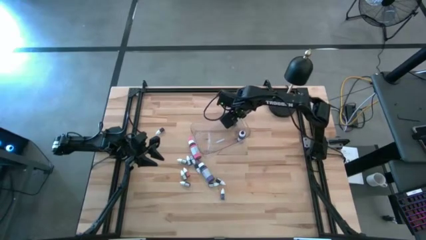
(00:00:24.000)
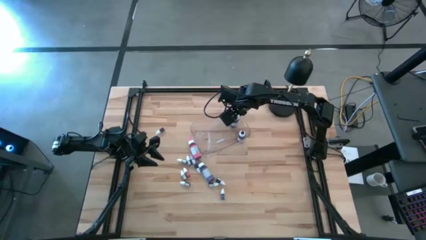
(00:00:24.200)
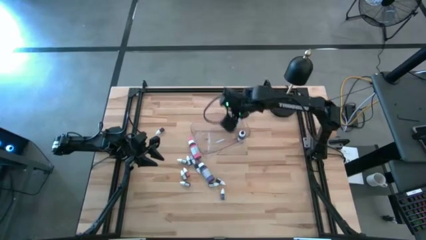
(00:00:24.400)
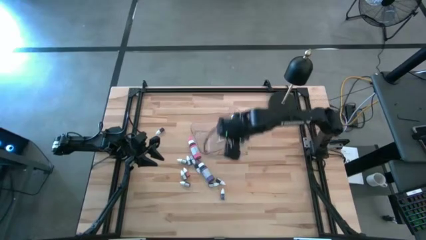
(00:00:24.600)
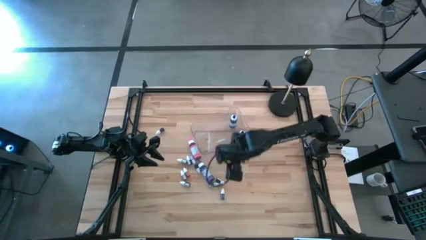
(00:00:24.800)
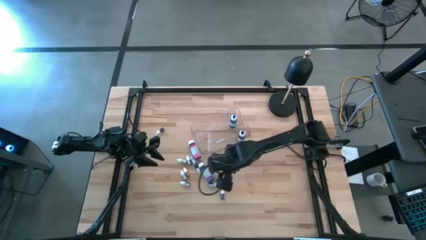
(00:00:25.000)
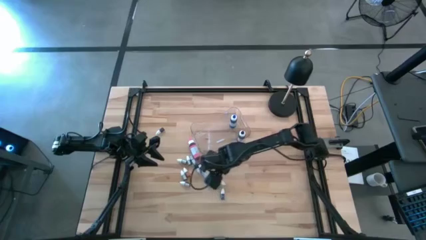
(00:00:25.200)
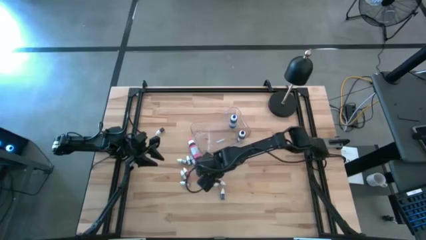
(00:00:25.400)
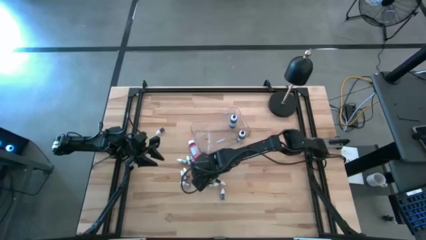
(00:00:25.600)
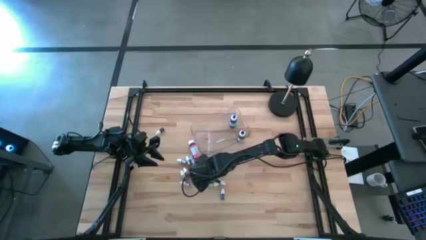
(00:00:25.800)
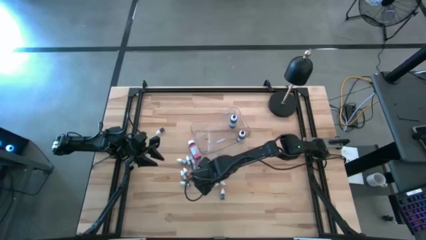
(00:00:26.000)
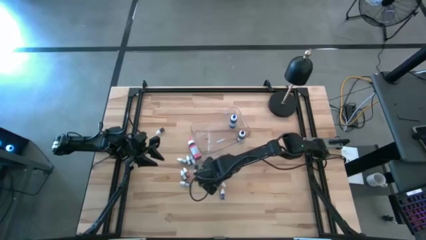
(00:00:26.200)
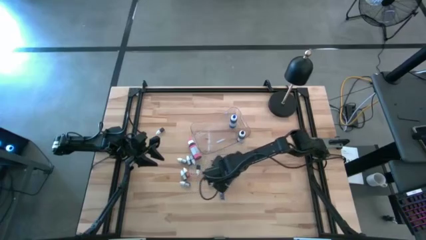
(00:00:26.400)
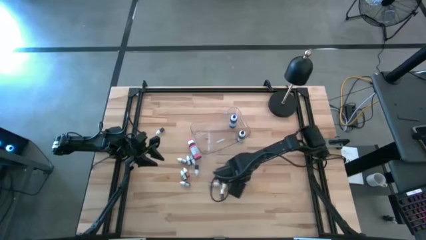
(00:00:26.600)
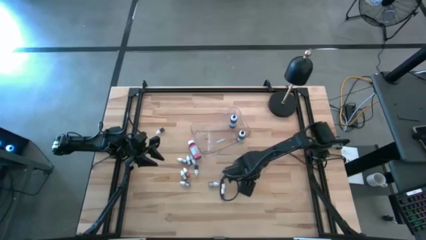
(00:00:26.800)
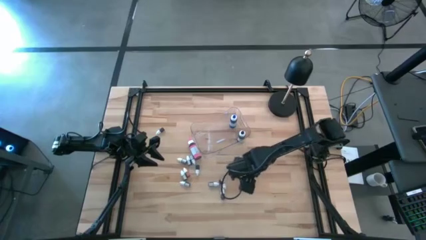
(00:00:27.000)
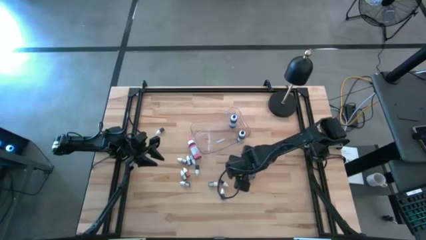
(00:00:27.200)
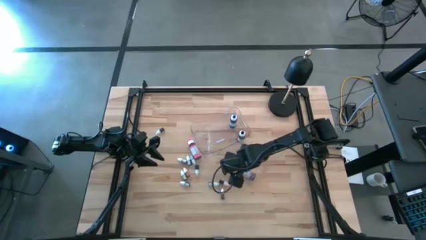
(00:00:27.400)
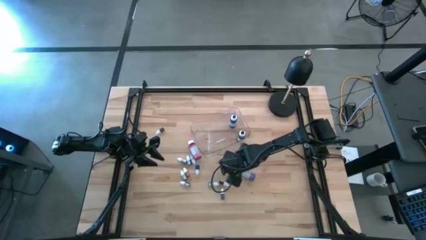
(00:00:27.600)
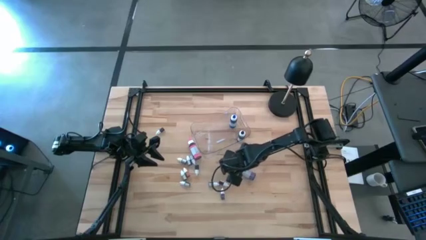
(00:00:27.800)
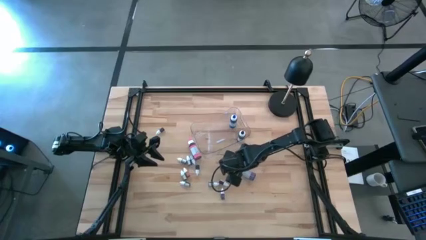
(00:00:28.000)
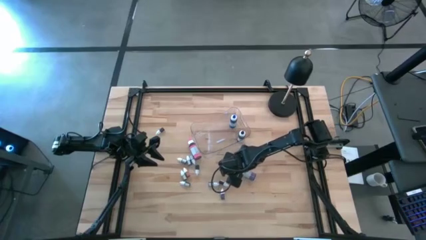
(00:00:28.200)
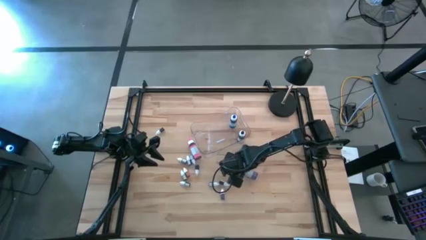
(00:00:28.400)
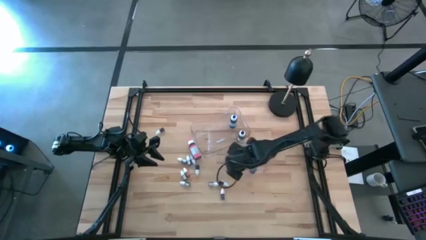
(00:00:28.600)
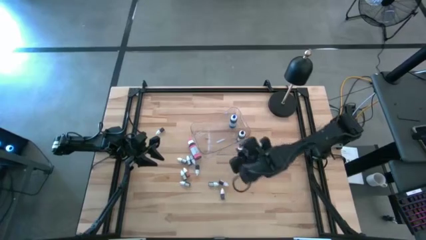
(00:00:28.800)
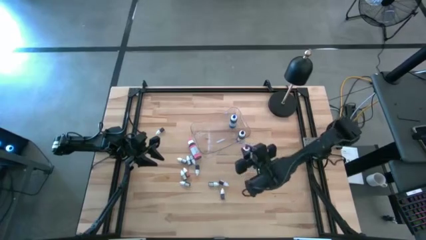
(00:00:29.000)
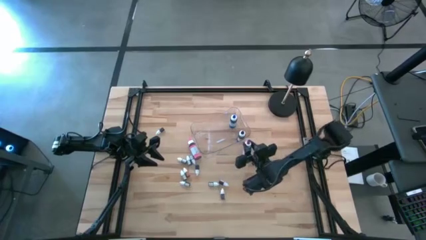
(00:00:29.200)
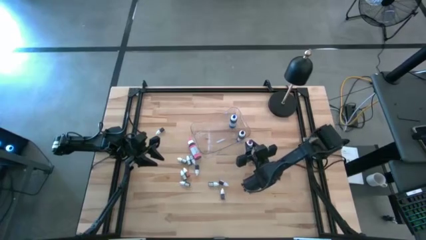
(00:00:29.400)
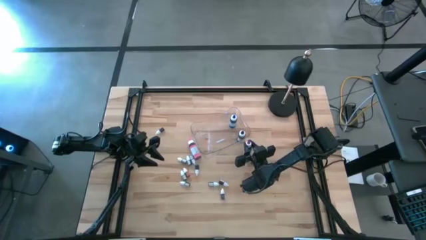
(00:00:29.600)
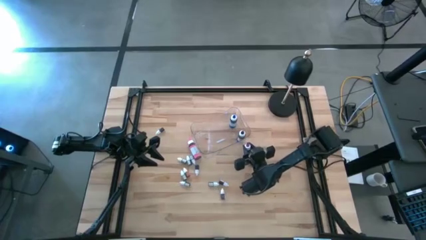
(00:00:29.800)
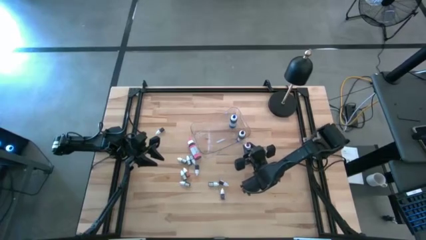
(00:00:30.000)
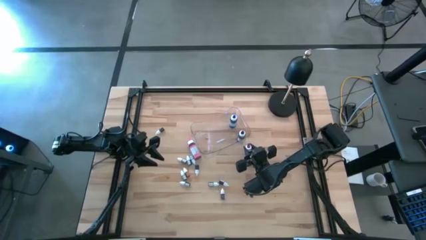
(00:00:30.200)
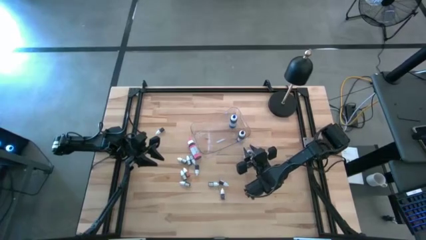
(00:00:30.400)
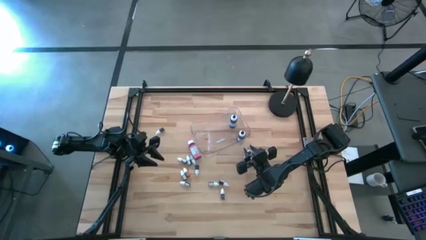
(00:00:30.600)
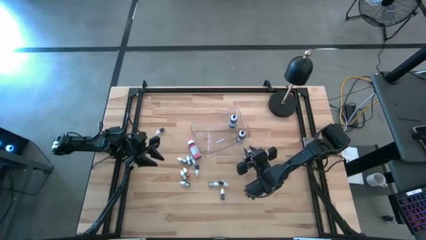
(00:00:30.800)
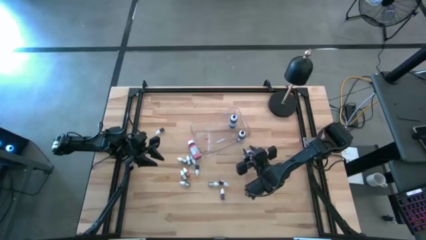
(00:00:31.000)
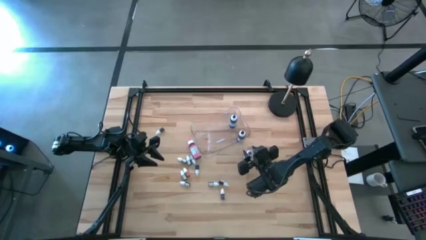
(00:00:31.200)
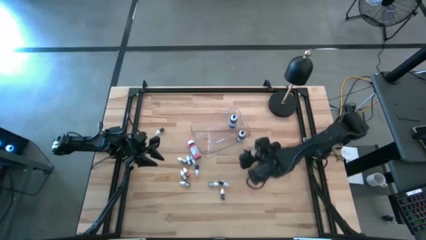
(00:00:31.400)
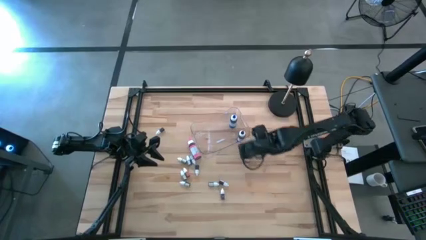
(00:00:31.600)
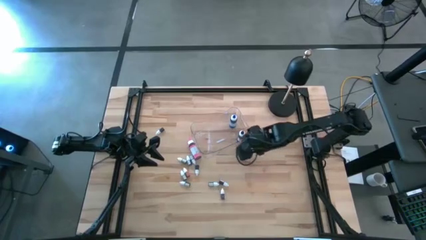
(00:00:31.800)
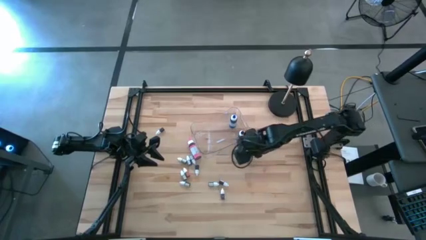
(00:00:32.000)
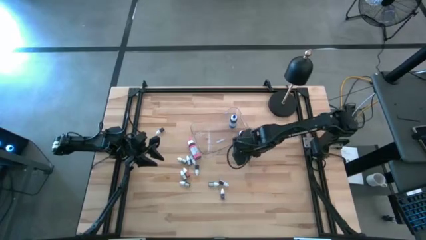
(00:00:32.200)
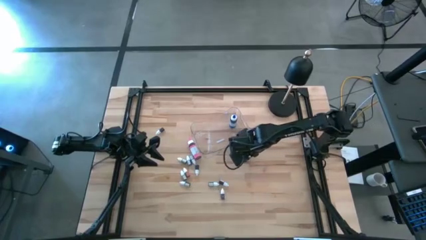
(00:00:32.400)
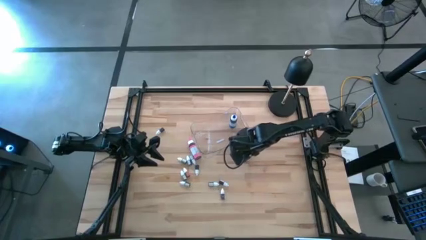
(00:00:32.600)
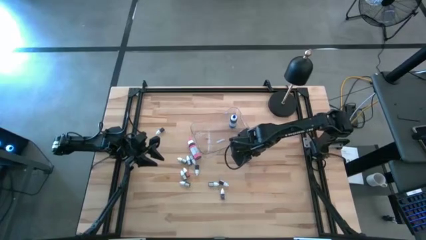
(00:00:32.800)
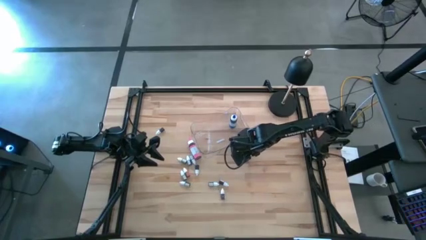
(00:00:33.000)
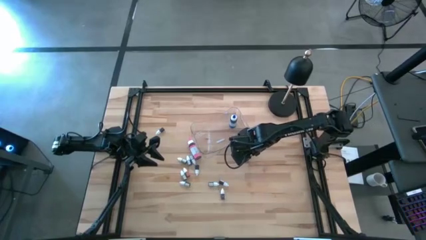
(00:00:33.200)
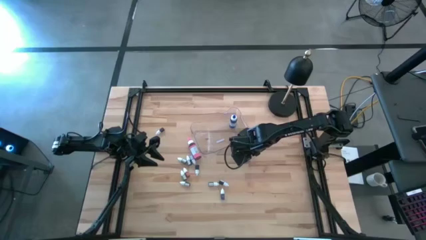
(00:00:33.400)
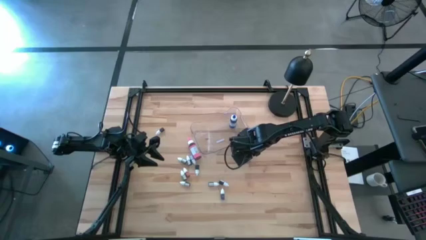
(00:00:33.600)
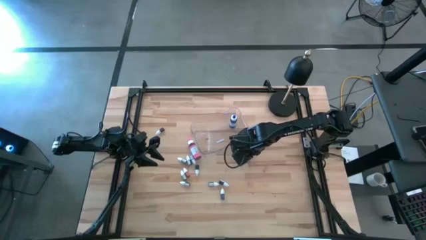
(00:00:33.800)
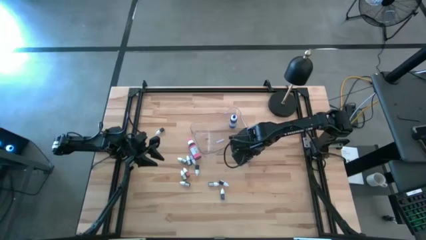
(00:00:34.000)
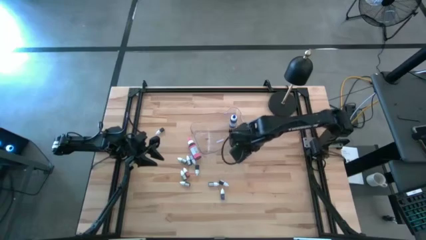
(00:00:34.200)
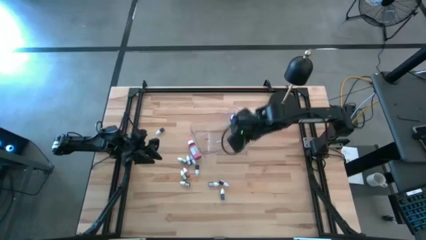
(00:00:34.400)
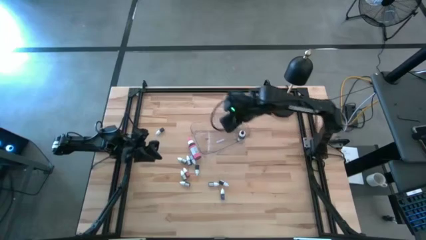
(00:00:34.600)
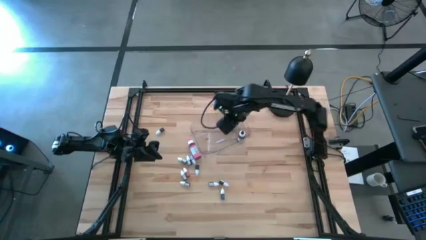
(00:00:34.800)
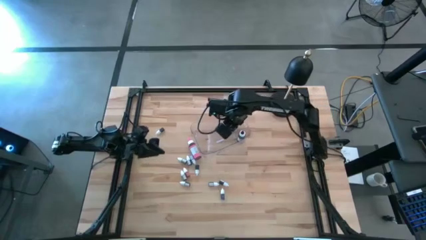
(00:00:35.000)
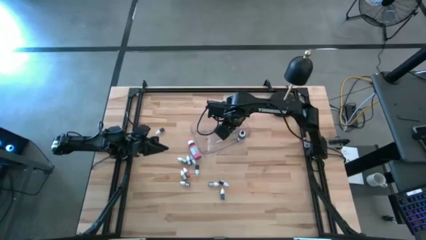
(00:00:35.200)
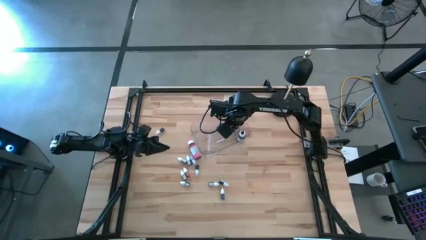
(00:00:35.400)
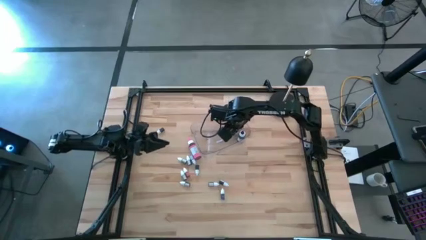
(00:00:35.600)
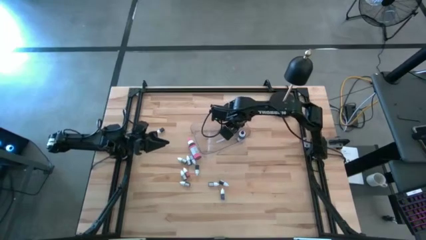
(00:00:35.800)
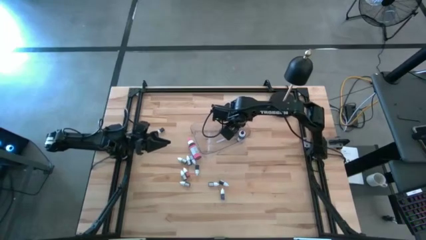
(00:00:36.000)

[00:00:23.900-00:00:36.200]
Task: Pick & Place food coloring
Put the big purple food coloring bottle into the transparent bin
